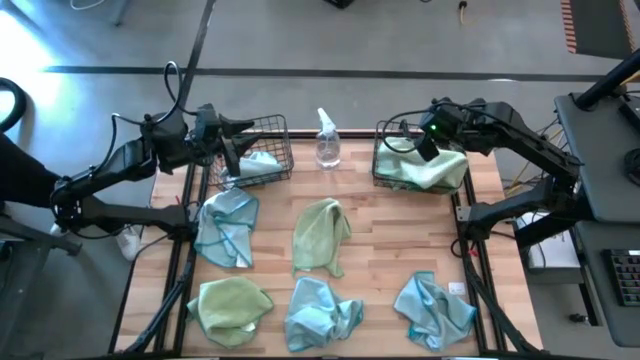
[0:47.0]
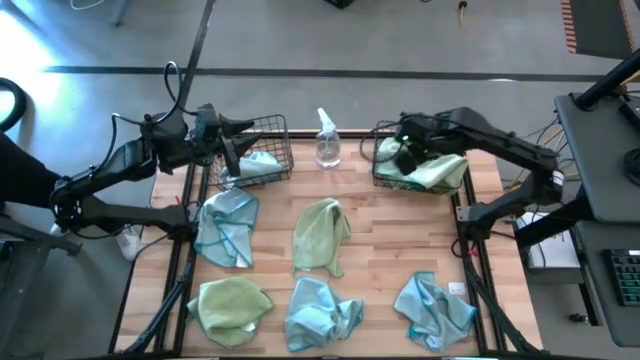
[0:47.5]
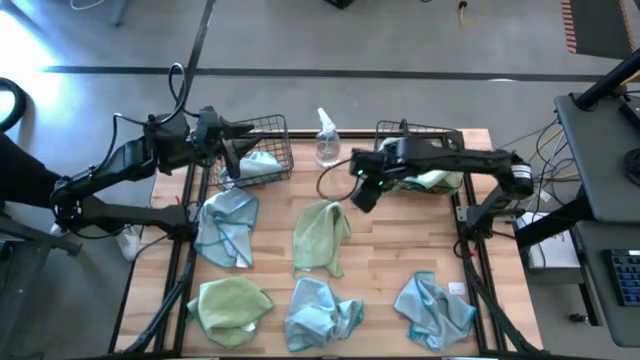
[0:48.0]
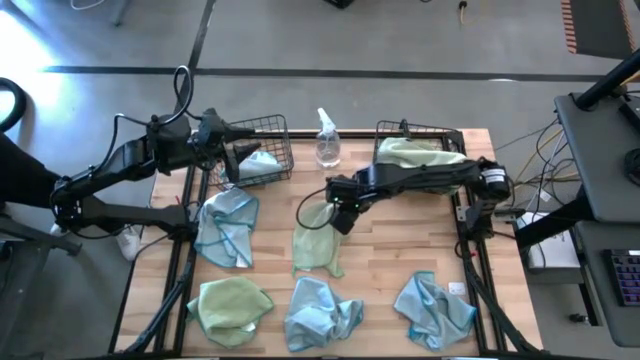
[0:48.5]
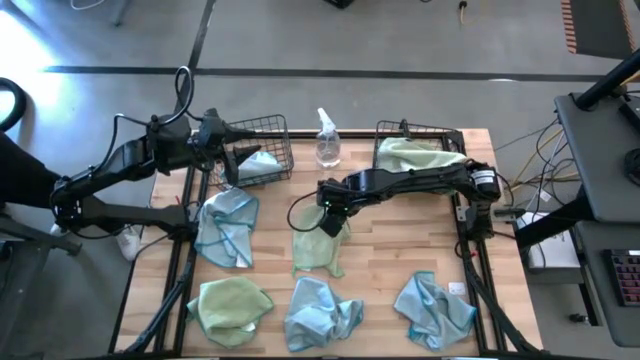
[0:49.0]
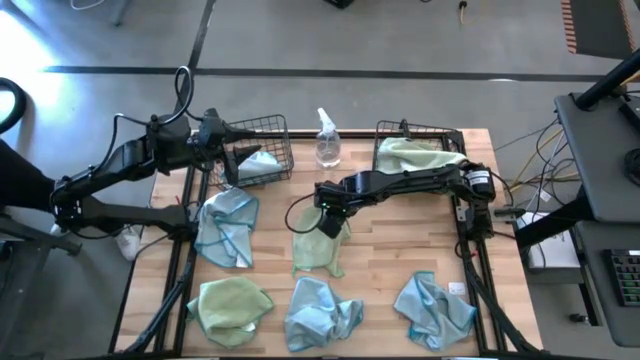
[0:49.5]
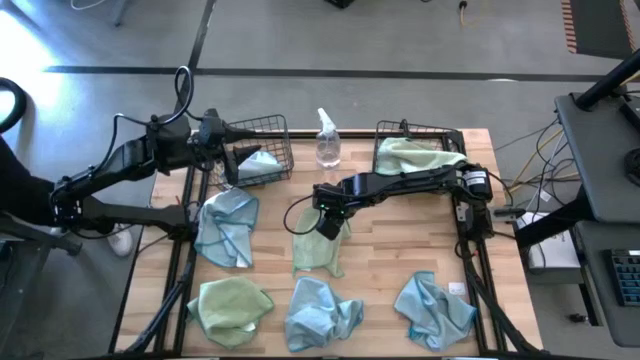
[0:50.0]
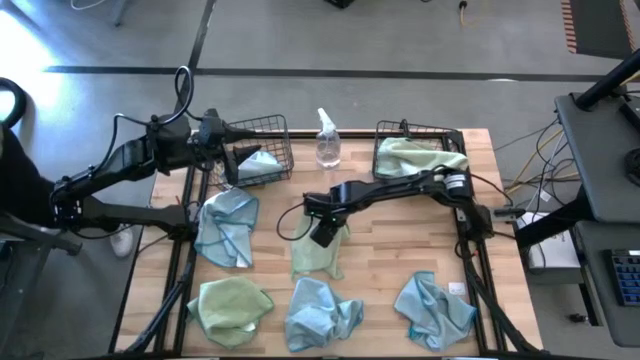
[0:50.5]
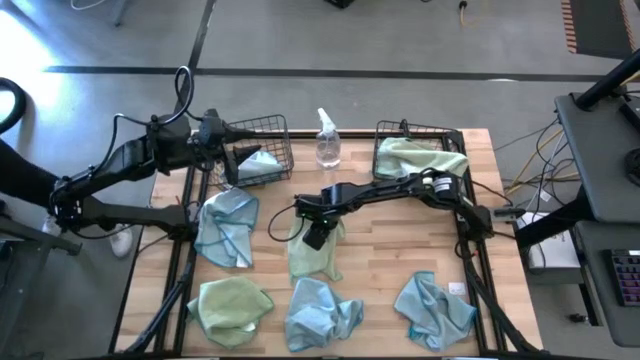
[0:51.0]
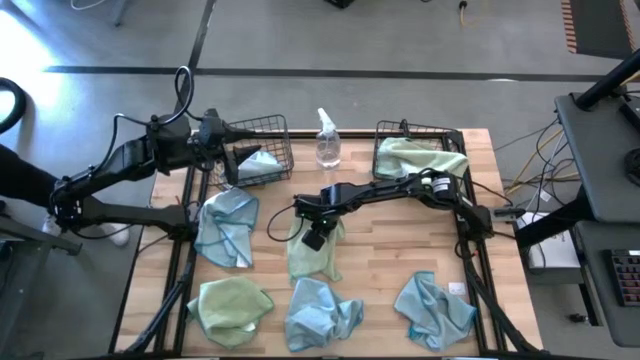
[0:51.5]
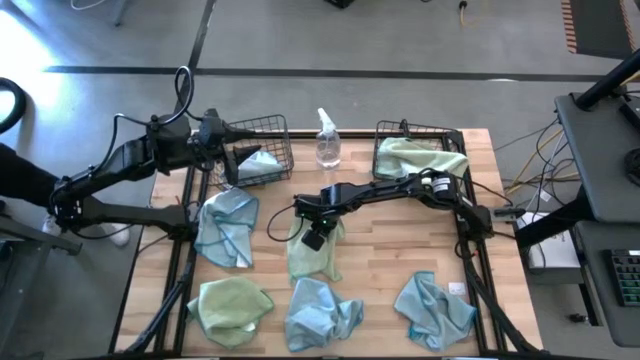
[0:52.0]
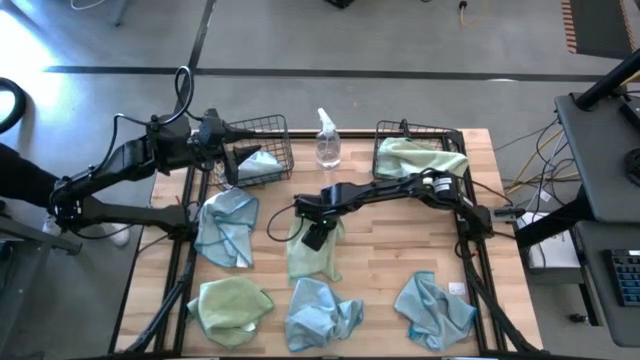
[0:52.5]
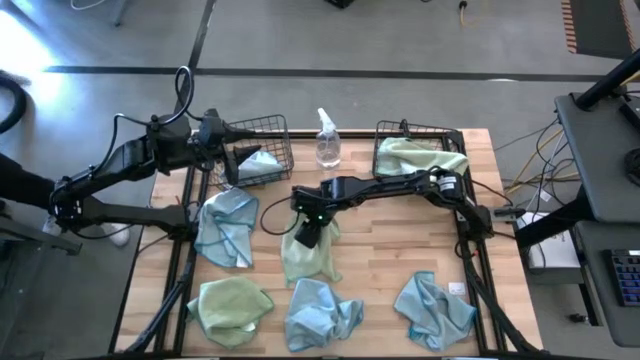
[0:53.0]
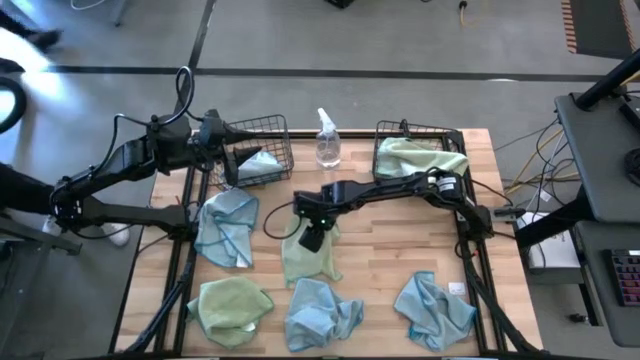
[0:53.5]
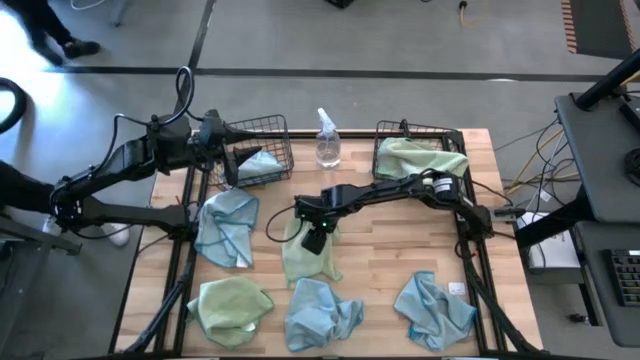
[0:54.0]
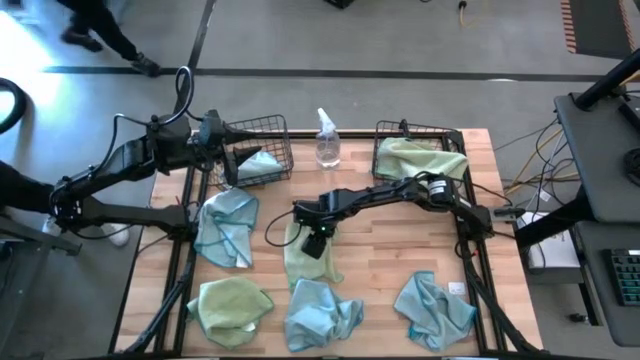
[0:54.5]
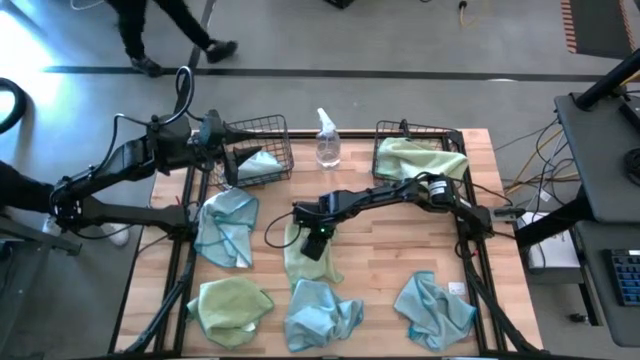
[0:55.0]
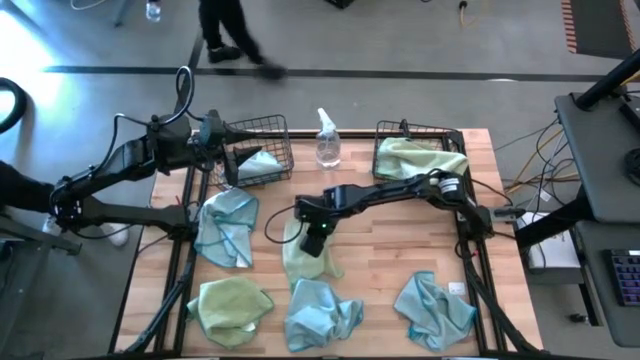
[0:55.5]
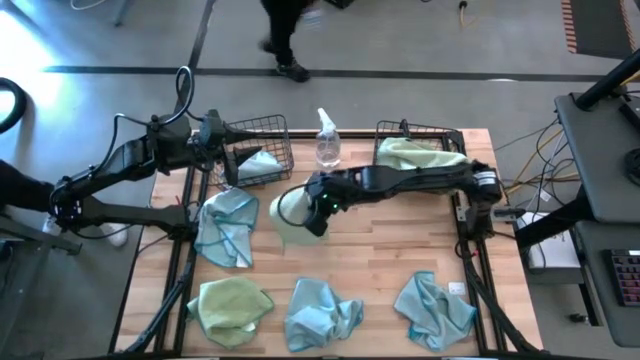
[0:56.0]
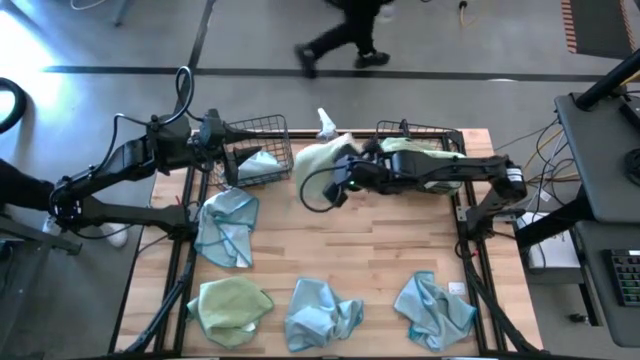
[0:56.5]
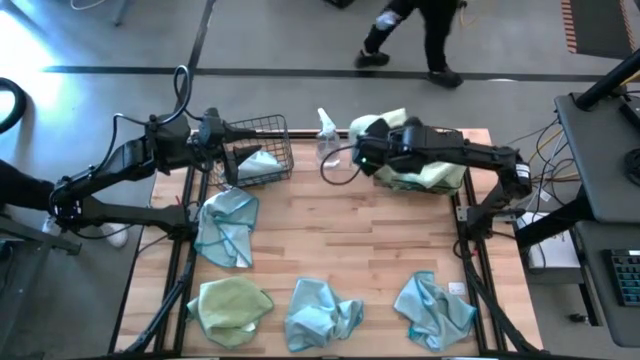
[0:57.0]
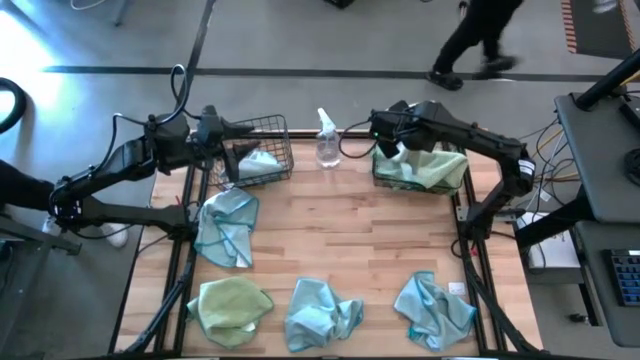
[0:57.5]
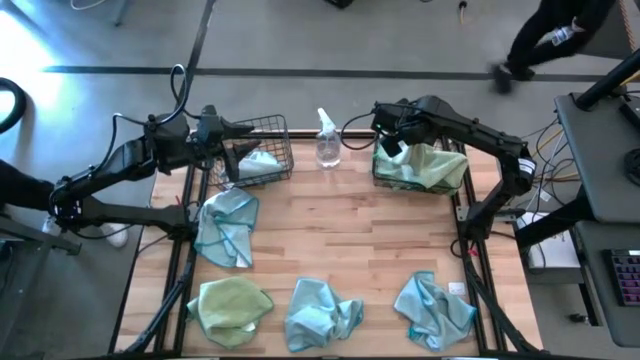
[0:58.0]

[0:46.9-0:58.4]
Task: Sort microfiber towel by color & place in baskets
Put the green microfiber cloth into the right wire basket
